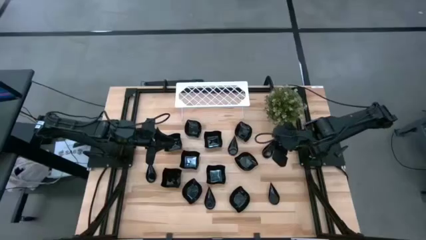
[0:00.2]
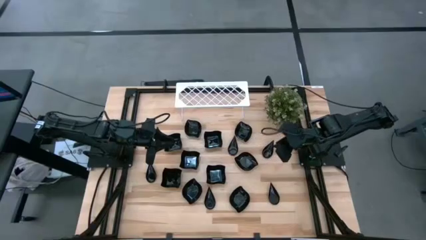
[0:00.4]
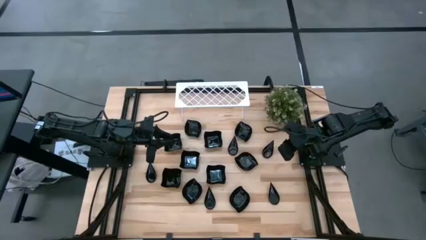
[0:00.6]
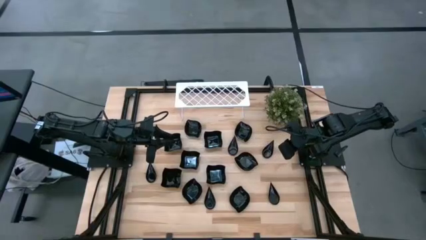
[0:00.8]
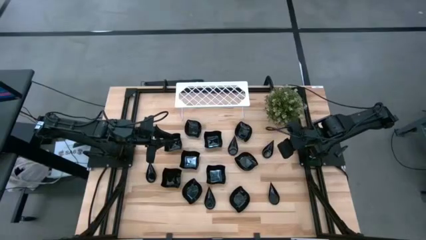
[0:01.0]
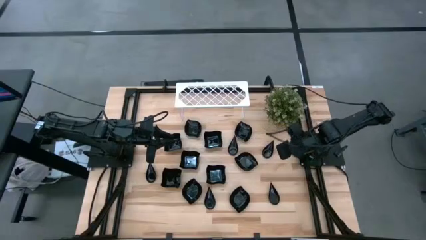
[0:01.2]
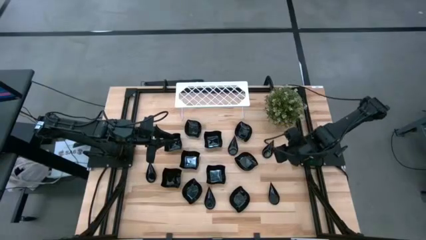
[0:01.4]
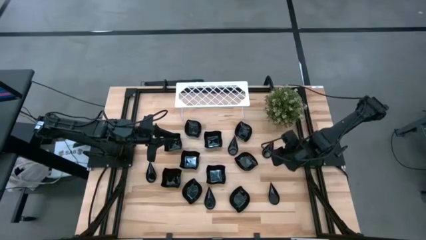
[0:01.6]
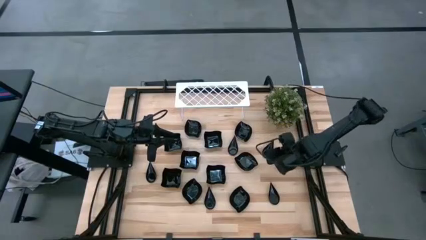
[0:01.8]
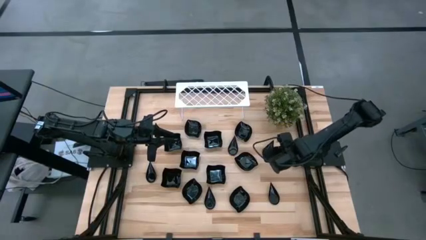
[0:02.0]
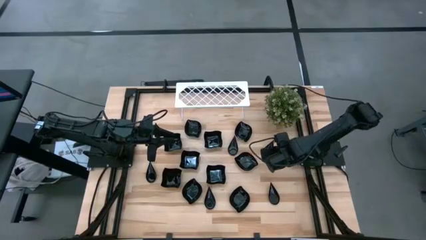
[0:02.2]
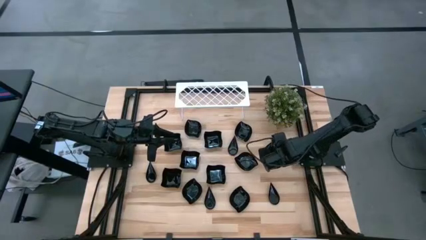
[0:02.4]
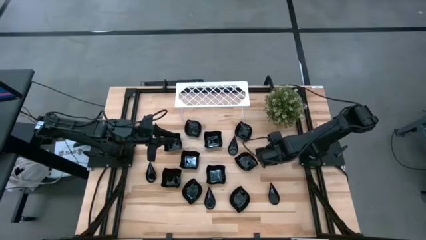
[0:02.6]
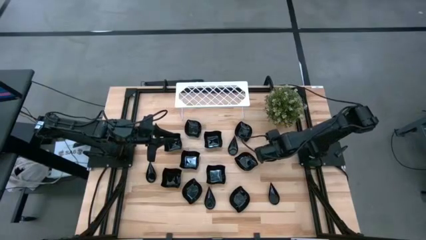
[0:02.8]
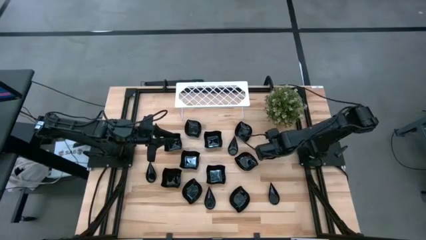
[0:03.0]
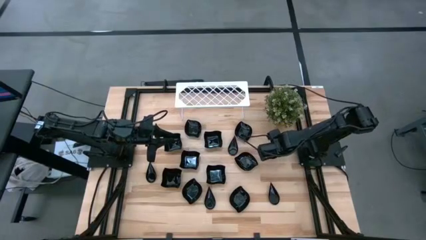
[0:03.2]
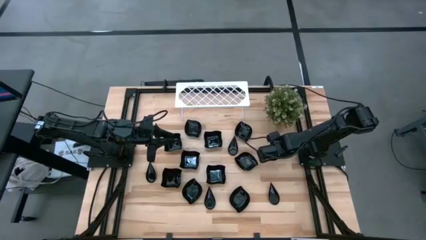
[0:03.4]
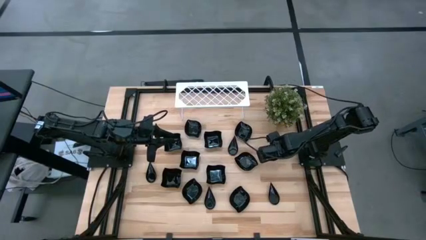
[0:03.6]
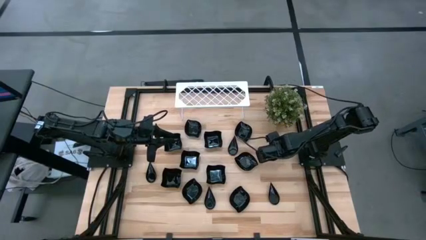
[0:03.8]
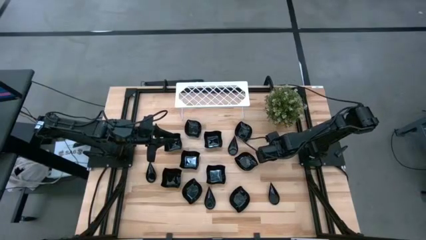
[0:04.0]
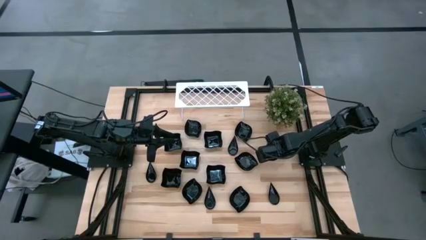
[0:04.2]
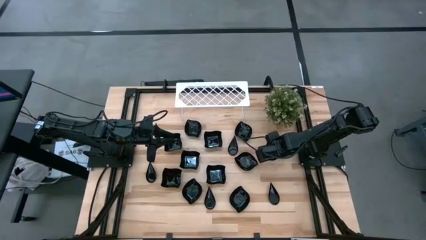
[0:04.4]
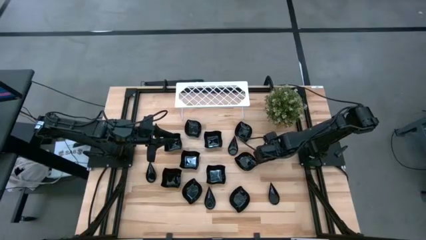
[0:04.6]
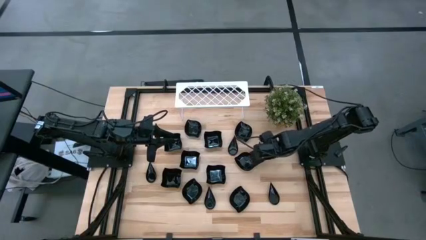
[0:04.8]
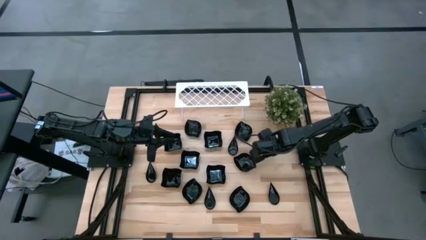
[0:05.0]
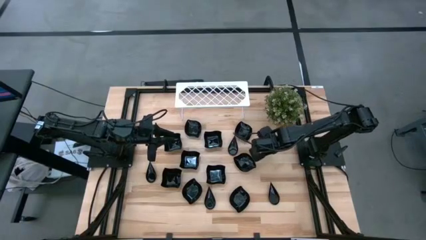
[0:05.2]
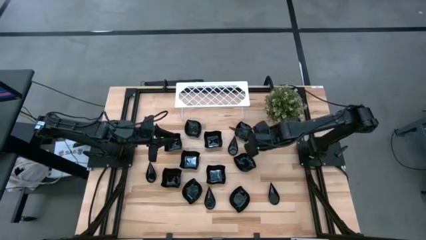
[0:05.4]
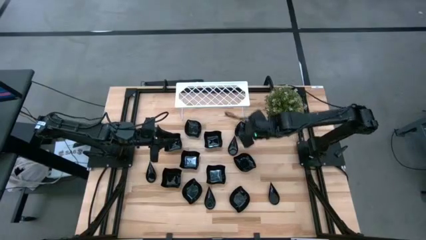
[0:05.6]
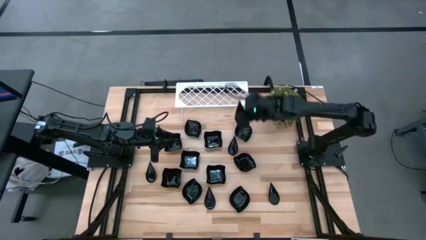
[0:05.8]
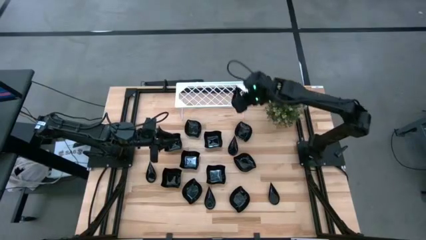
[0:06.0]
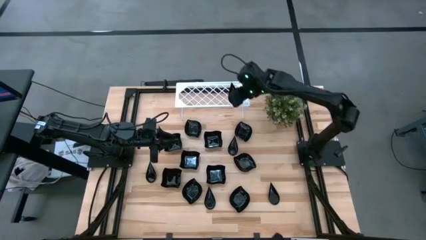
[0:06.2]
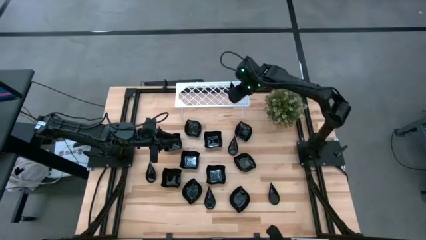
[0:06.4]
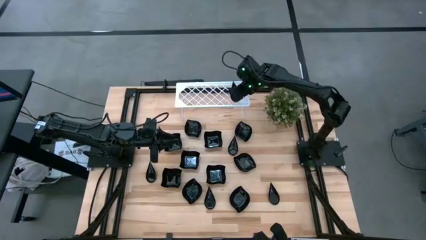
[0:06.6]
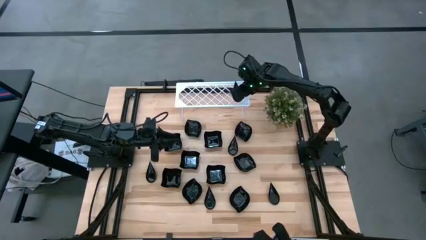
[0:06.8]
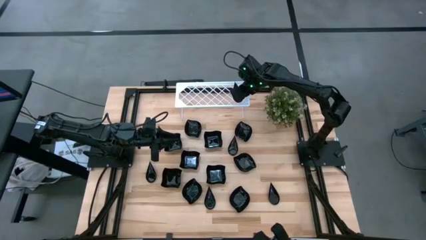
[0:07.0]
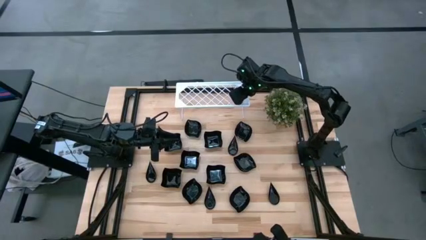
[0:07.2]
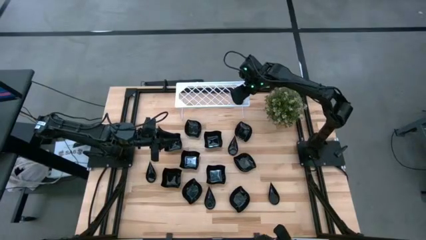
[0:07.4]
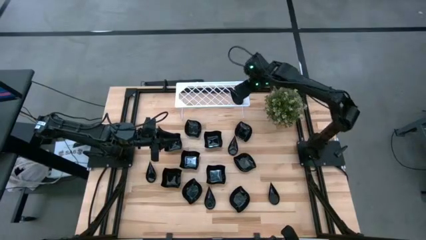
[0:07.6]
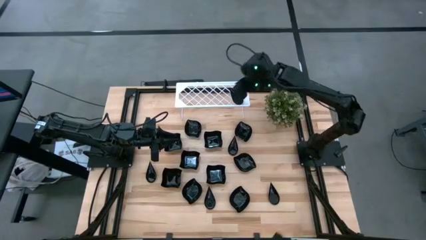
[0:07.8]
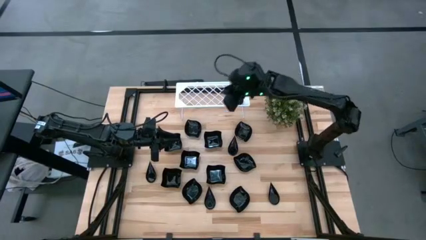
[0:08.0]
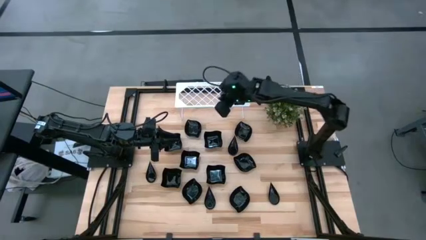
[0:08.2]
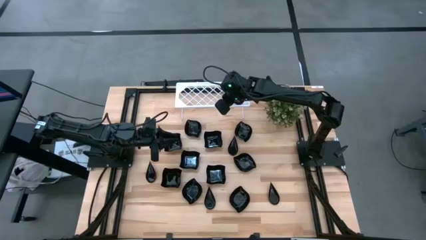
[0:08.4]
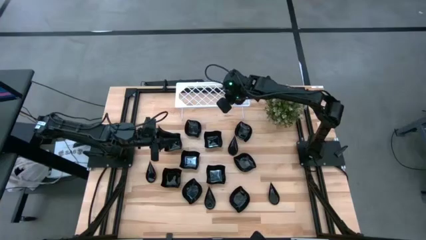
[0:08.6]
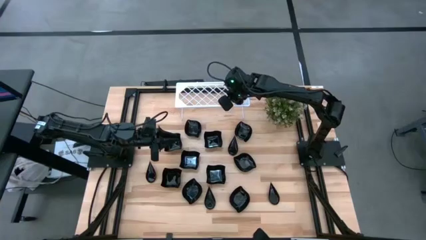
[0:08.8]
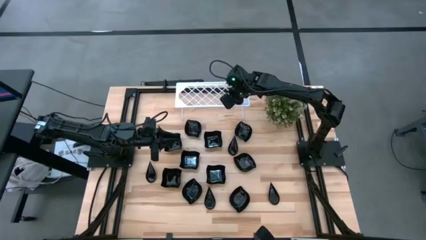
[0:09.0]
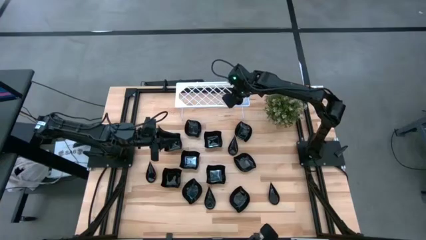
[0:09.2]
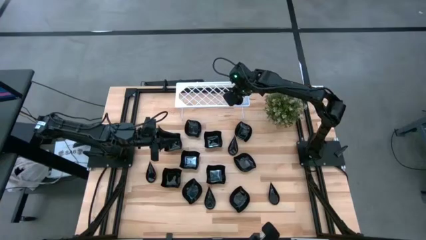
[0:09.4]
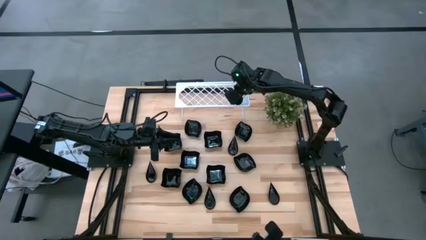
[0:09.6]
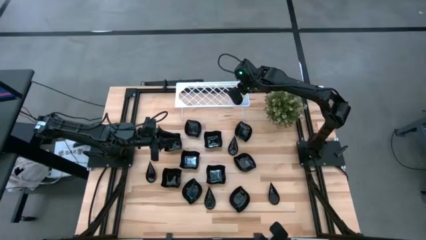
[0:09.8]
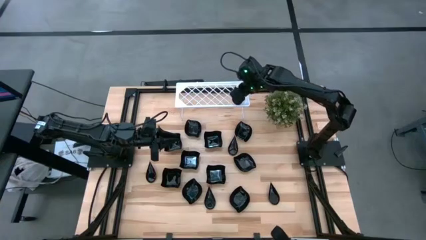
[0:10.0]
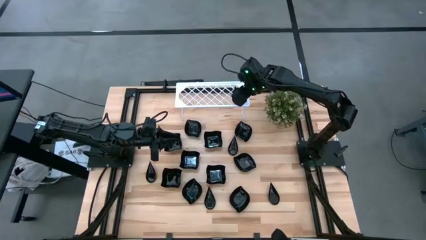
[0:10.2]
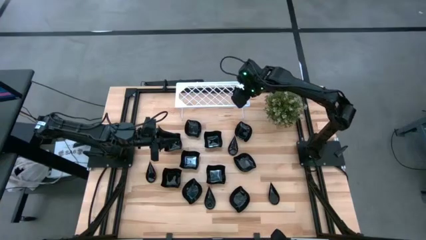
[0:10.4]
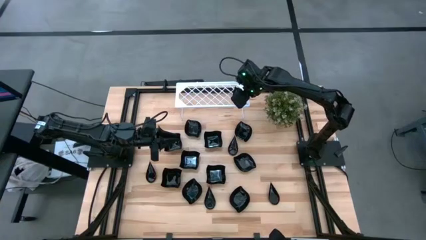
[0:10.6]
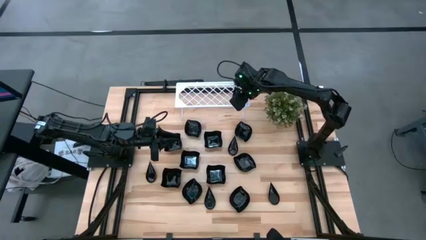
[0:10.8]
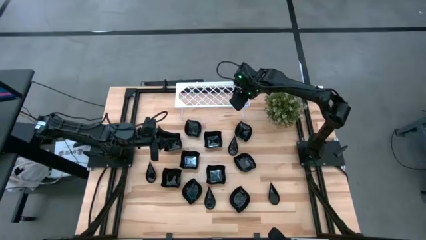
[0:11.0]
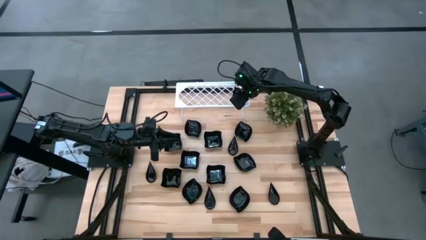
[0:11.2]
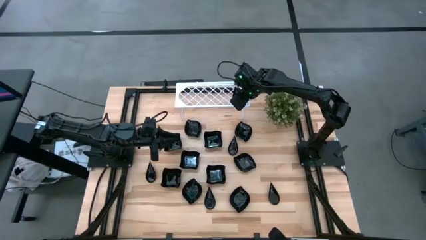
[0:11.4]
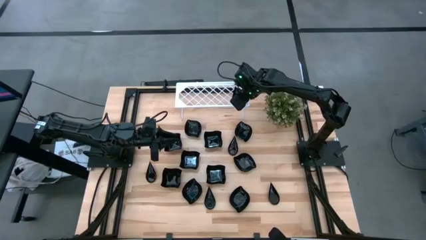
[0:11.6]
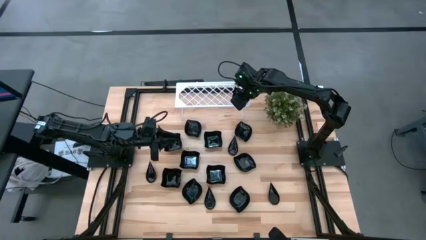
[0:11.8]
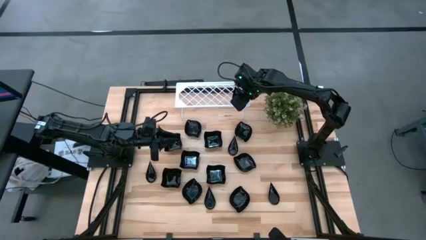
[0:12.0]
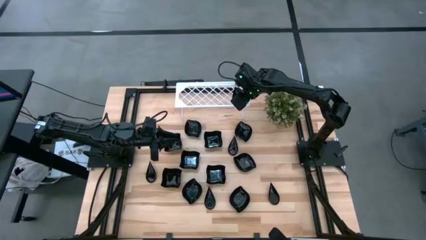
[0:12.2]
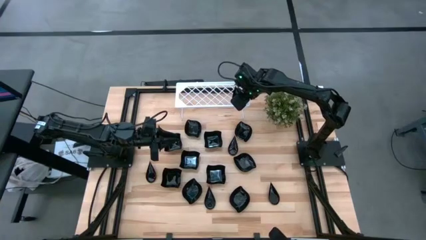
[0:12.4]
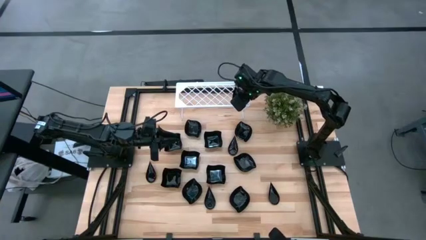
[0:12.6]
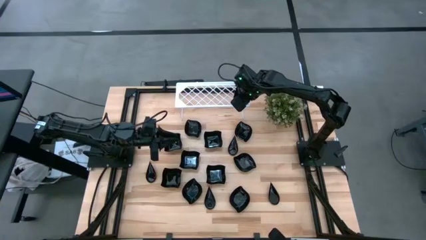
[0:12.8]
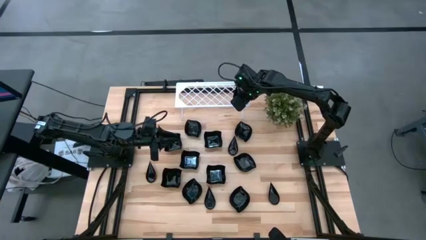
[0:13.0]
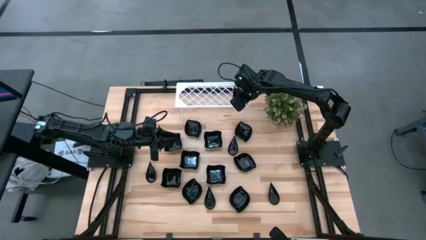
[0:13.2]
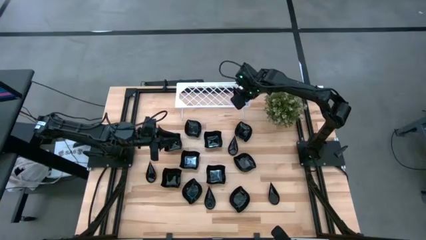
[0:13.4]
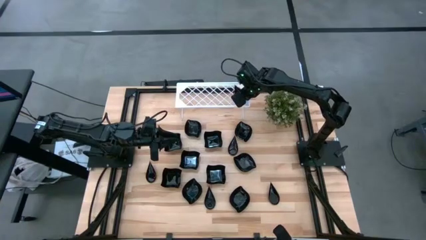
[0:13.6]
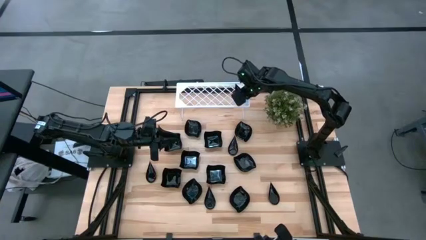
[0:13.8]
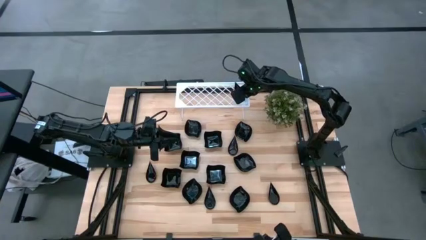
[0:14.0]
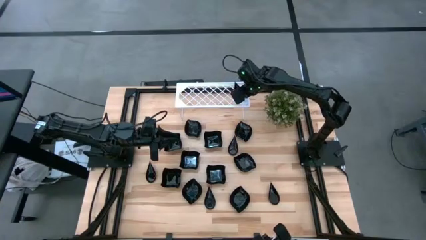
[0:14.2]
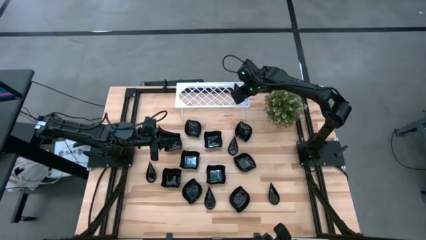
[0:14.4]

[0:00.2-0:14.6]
Task: Pick & Place Mini shaped plates
Put the drop-shaped plate on the shelf
